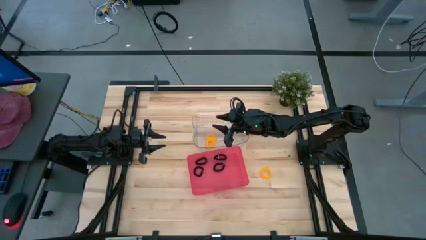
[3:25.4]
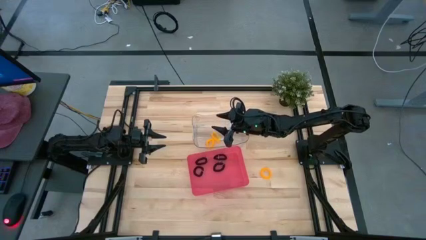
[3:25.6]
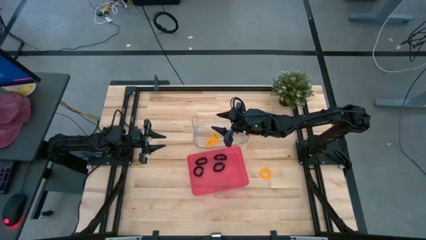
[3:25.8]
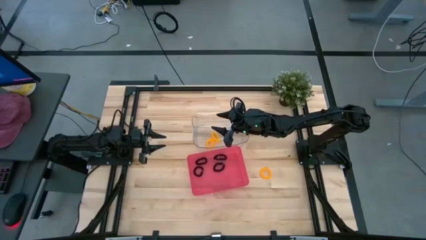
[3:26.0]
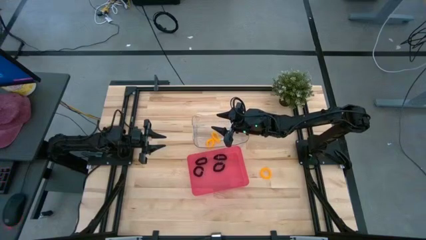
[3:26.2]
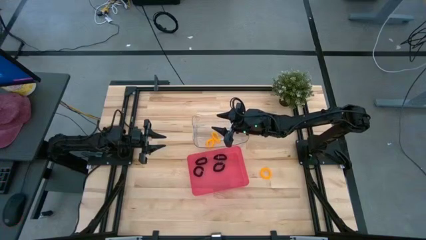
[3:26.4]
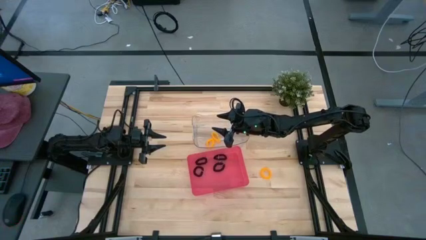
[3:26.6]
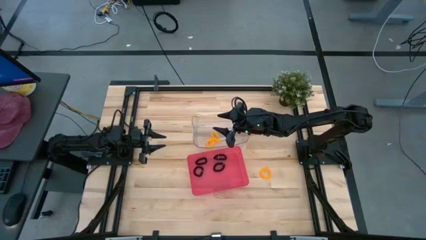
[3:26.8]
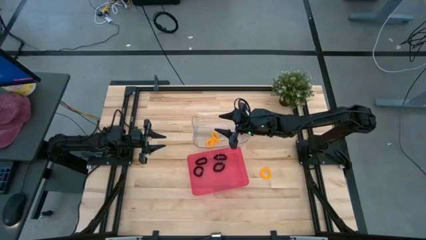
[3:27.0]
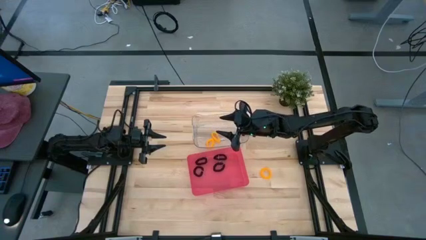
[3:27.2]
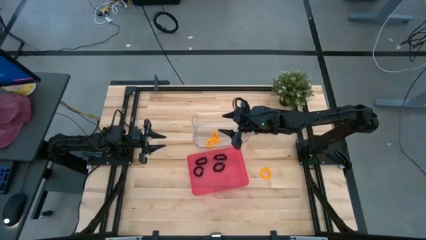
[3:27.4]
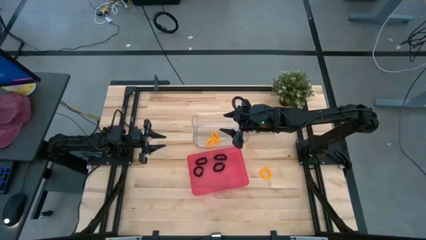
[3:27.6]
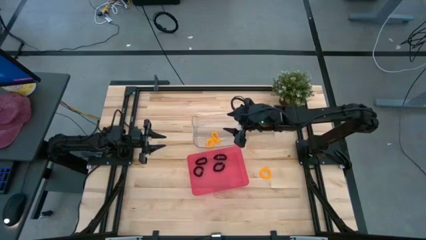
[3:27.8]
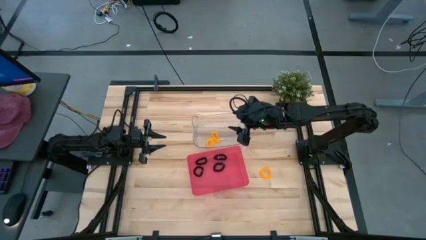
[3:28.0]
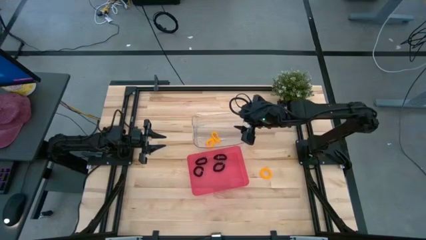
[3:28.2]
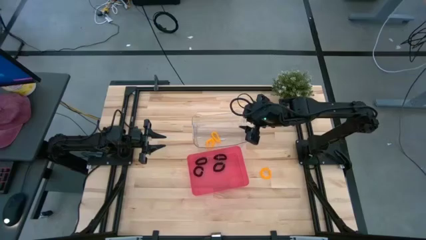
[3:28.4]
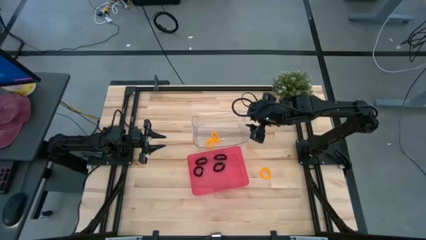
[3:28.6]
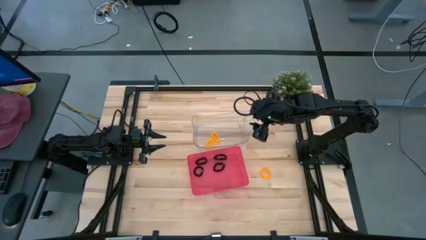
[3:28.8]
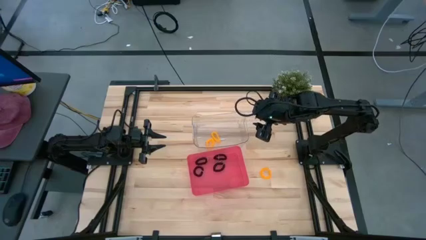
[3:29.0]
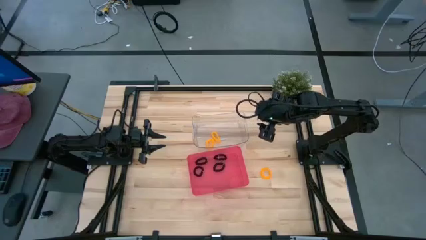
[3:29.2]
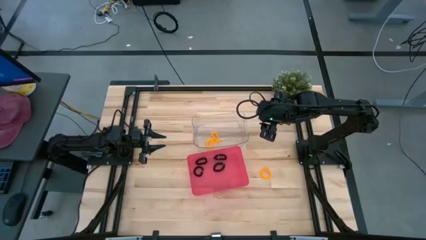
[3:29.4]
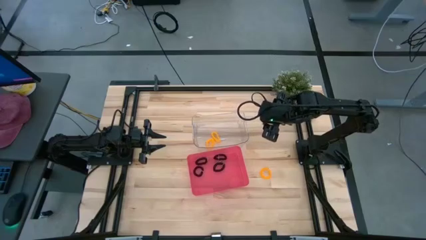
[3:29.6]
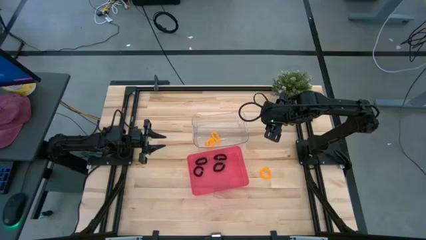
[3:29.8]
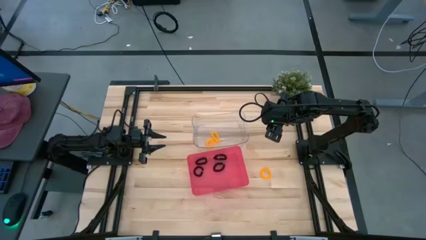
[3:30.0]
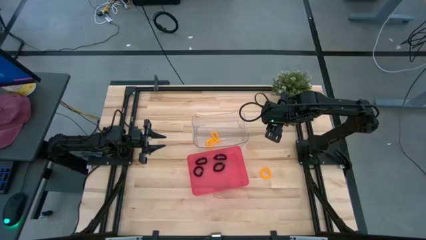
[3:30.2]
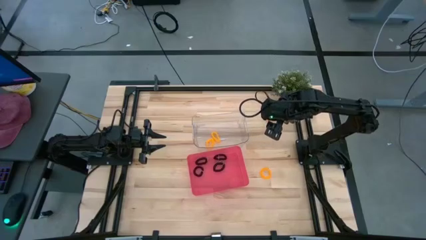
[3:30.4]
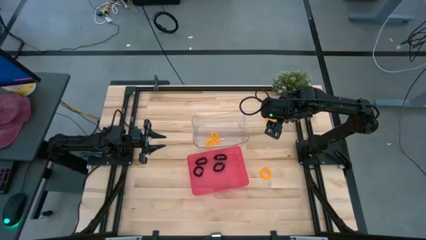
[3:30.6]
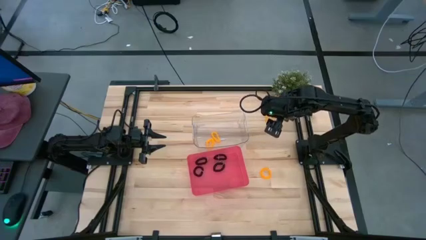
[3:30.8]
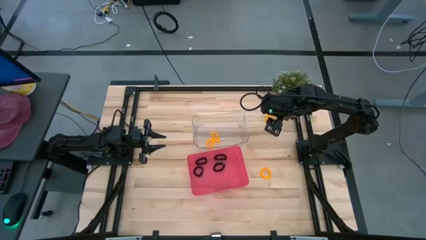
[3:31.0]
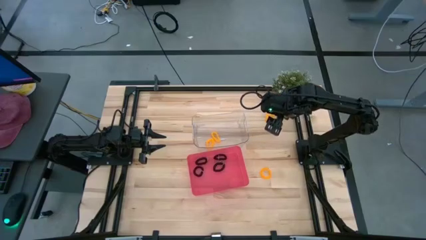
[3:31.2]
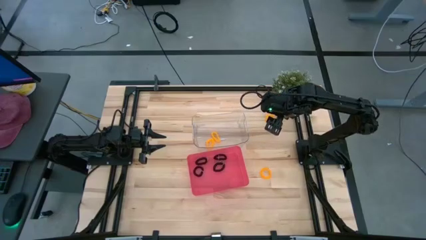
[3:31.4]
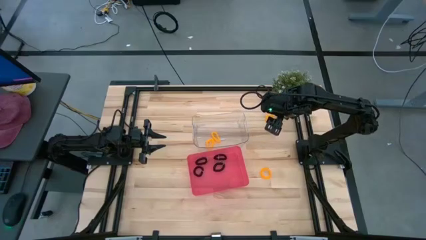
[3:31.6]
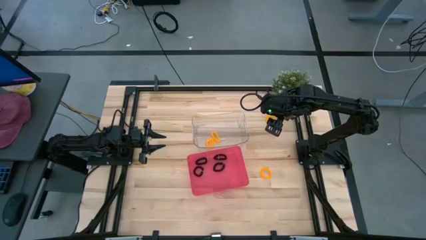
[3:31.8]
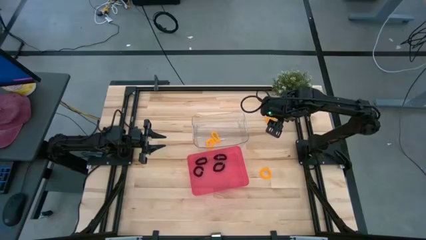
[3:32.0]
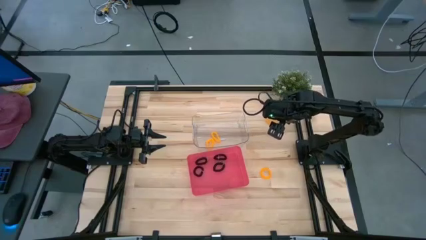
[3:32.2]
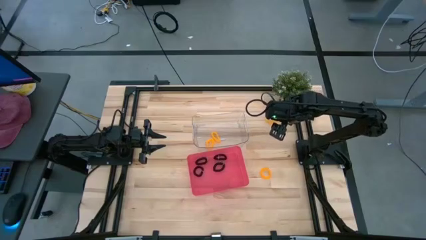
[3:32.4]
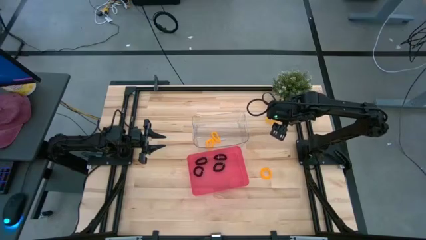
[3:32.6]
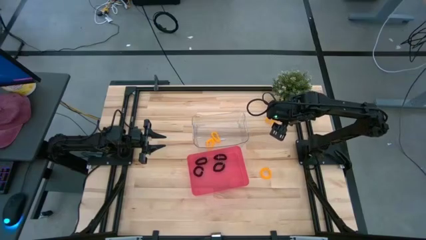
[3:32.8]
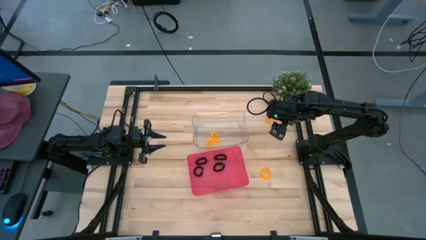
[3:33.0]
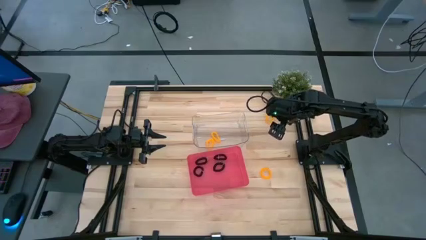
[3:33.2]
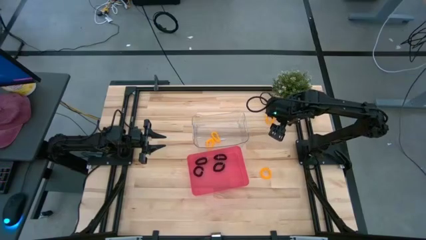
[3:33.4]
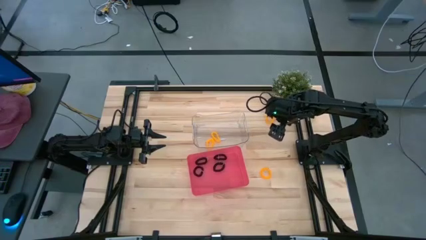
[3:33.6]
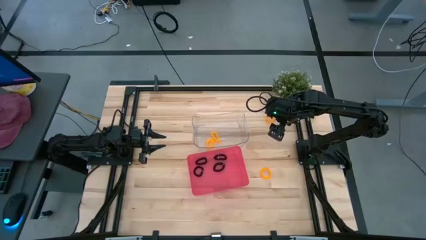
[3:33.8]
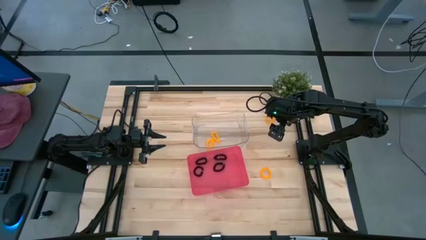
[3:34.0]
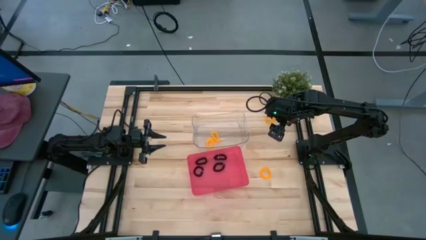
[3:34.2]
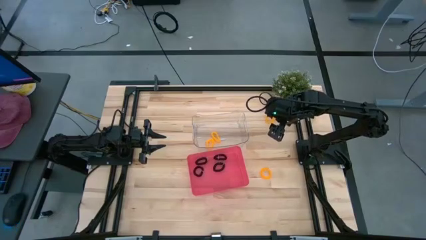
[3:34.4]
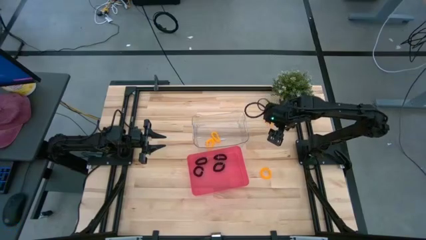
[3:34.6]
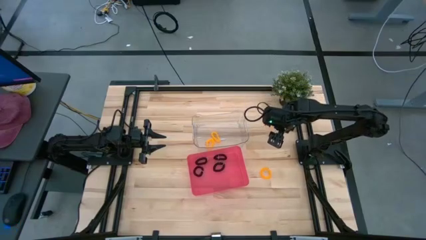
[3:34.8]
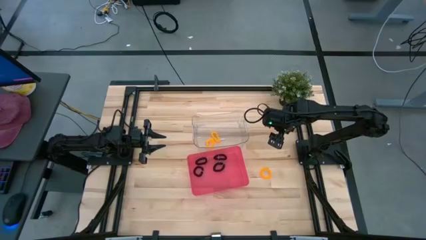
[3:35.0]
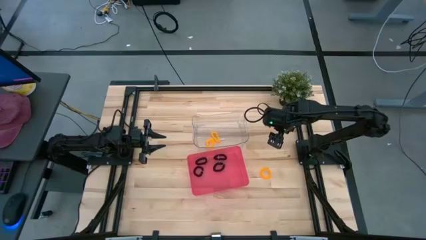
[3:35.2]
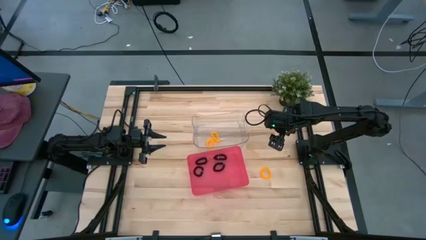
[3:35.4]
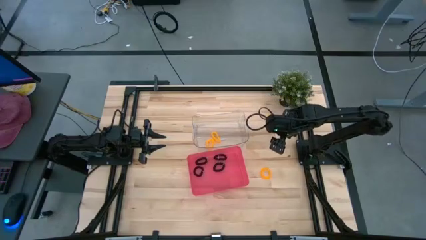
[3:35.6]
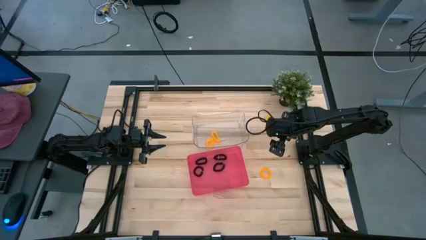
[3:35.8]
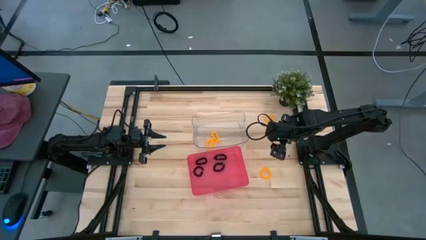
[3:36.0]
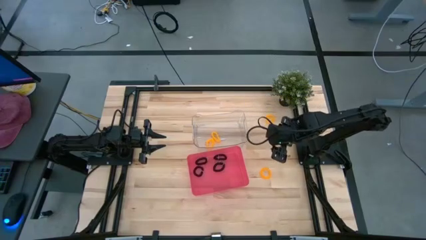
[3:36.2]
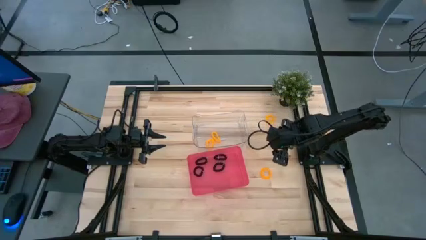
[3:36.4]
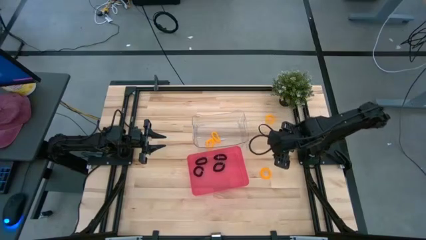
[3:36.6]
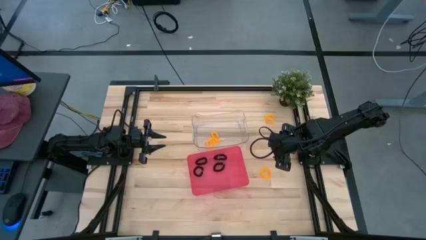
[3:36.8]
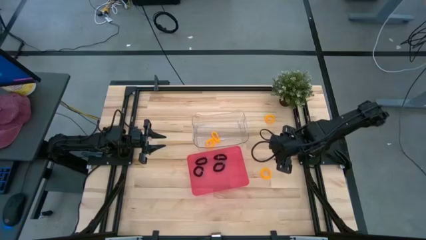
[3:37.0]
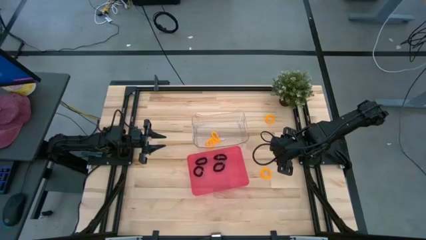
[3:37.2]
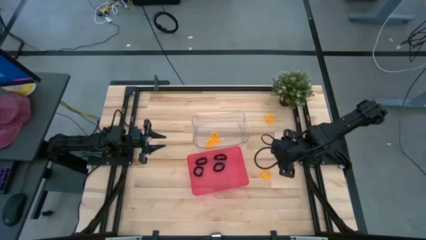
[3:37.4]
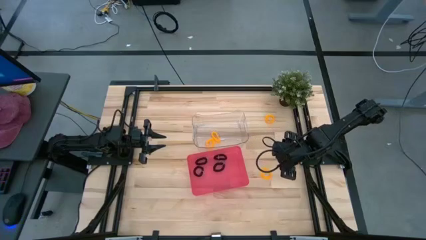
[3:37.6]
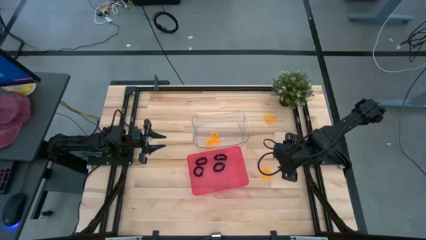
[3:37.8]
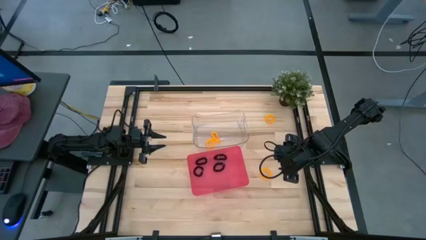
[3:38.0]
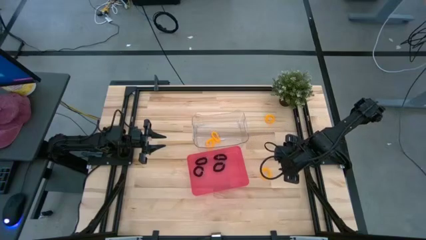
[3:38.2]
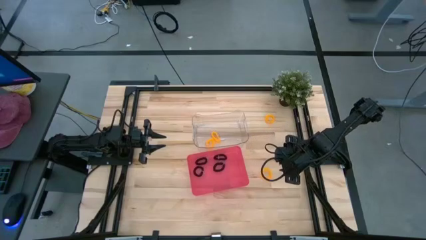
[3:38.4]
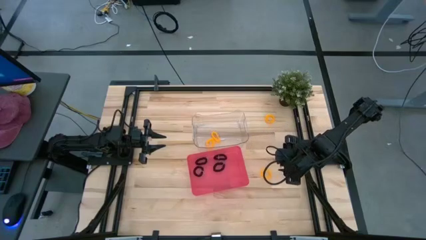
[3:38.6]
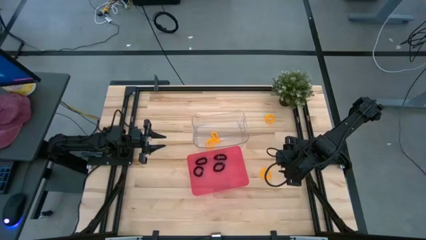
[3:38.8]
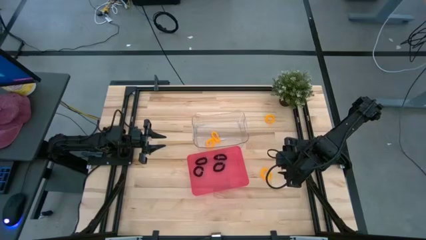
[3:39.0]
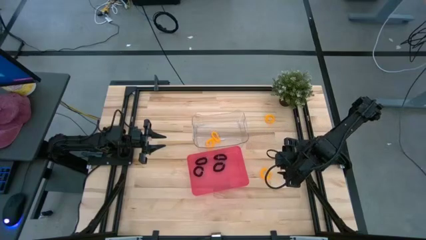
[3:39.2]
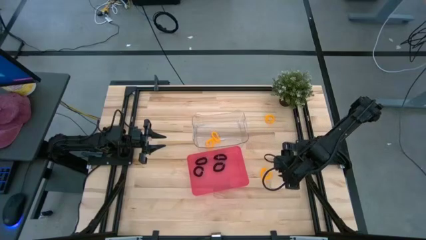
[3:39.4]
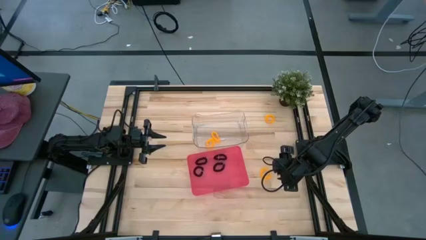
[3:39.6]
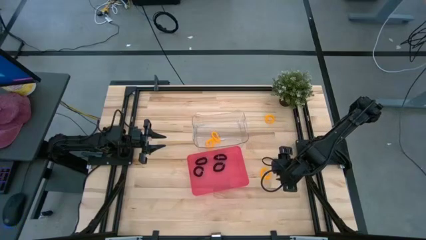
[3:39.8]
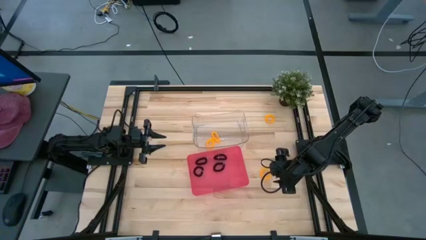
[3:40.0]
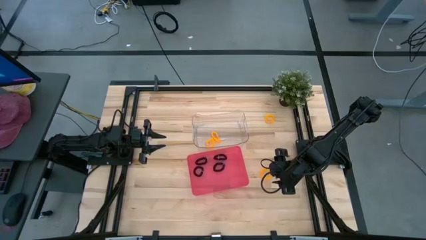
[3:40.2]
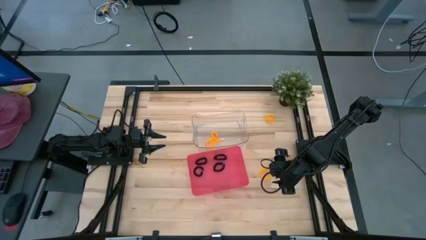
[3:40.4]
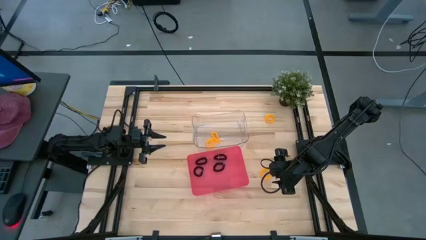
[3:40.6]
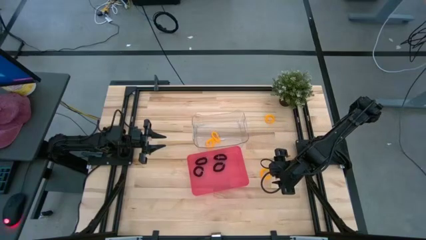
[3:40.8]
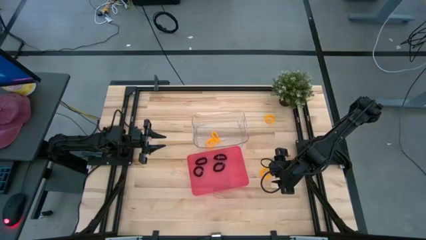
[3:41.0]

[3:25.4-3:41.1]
Task: Sort spring keychains
Put the top yellow spring keychain into the transparent bin
